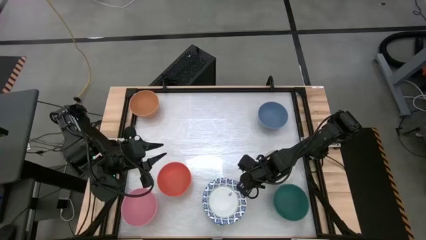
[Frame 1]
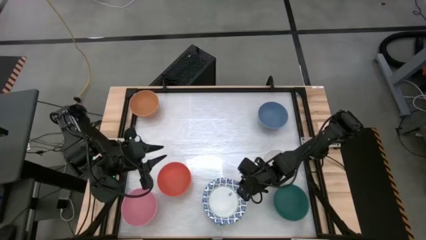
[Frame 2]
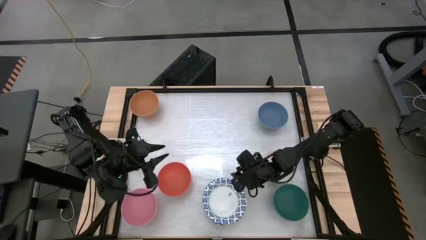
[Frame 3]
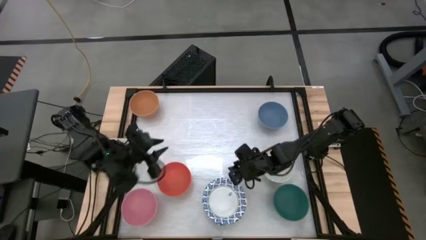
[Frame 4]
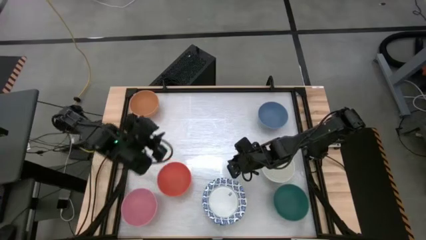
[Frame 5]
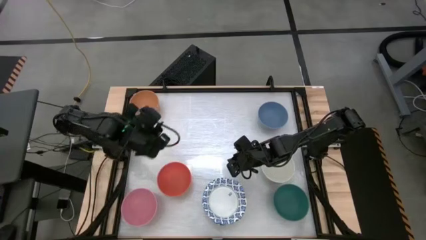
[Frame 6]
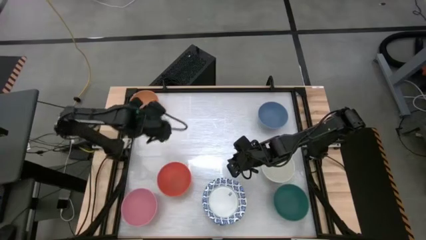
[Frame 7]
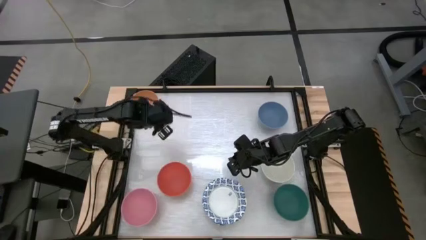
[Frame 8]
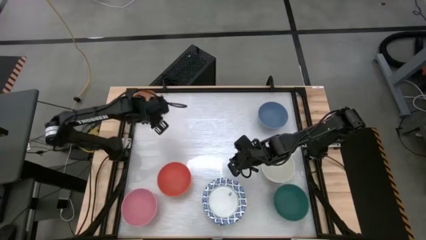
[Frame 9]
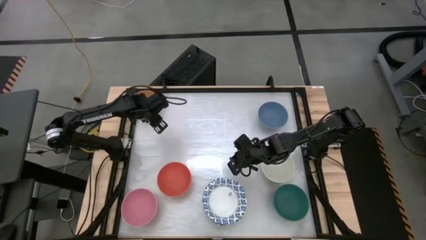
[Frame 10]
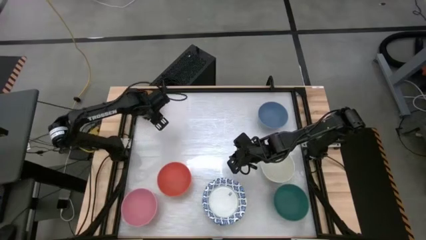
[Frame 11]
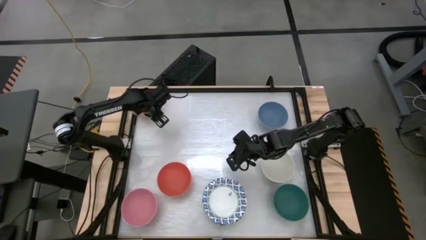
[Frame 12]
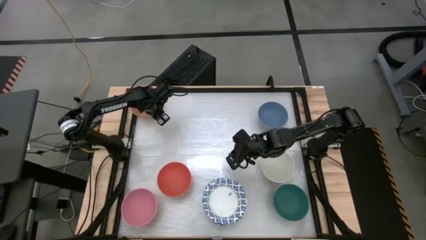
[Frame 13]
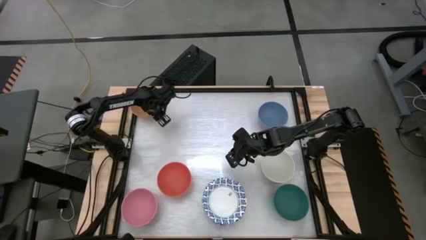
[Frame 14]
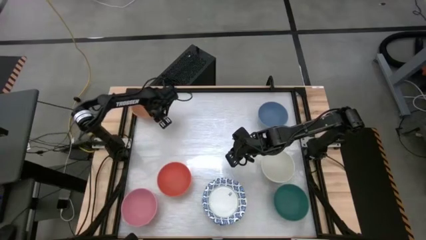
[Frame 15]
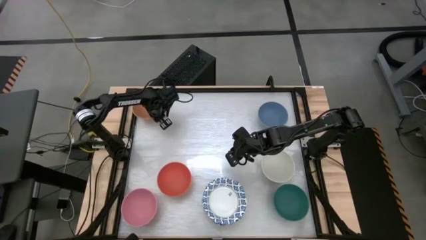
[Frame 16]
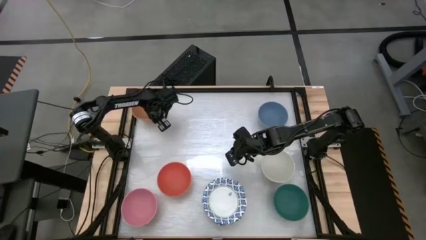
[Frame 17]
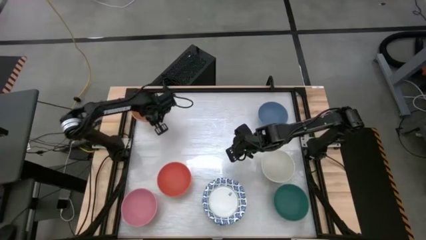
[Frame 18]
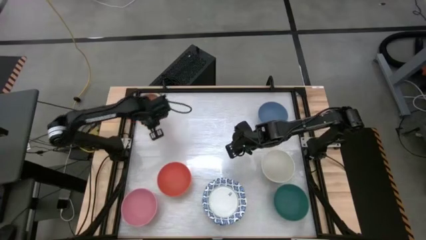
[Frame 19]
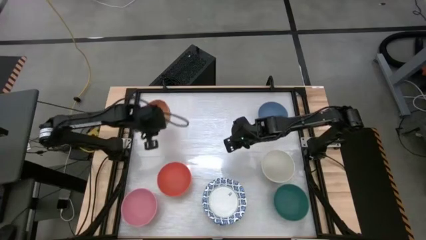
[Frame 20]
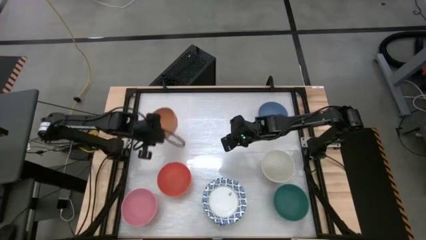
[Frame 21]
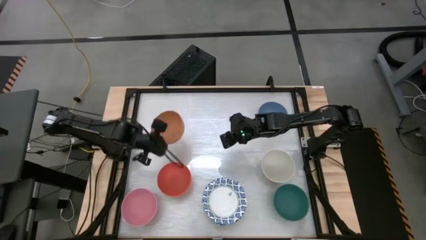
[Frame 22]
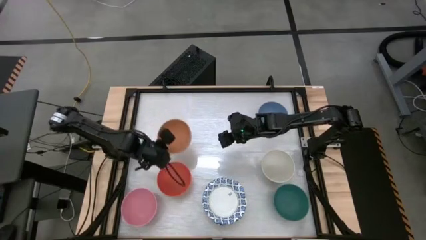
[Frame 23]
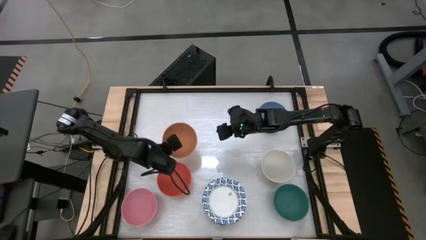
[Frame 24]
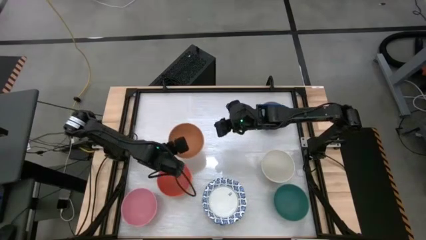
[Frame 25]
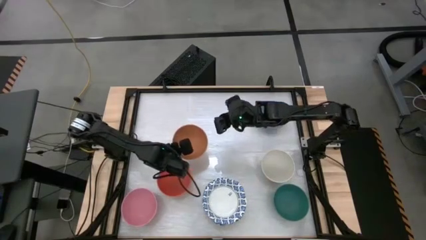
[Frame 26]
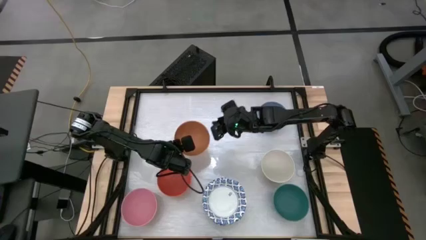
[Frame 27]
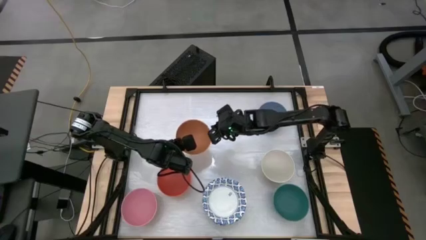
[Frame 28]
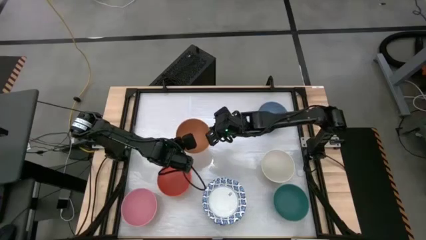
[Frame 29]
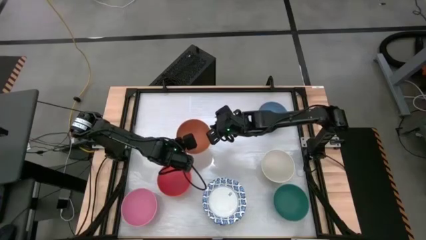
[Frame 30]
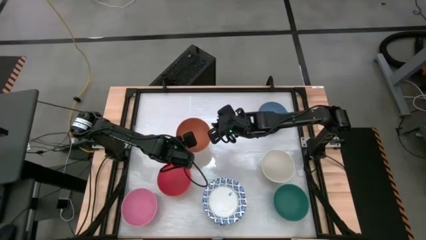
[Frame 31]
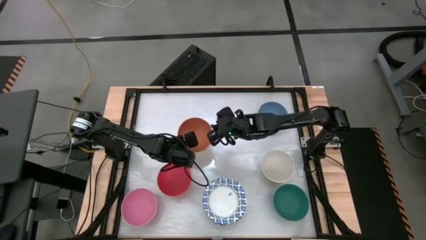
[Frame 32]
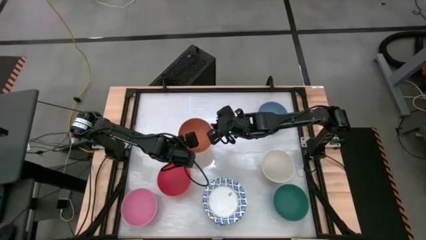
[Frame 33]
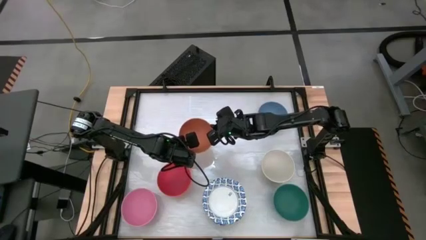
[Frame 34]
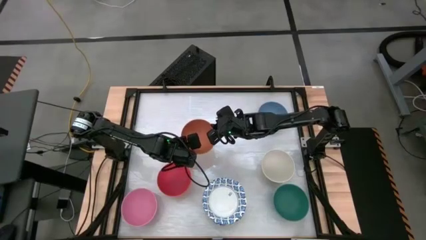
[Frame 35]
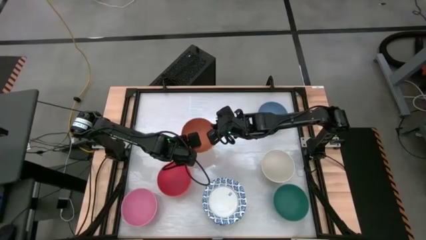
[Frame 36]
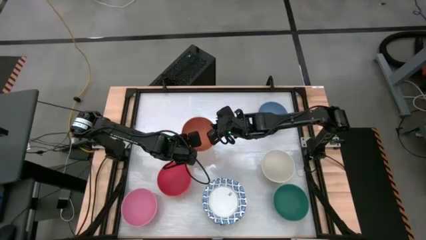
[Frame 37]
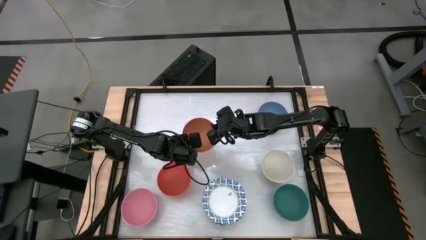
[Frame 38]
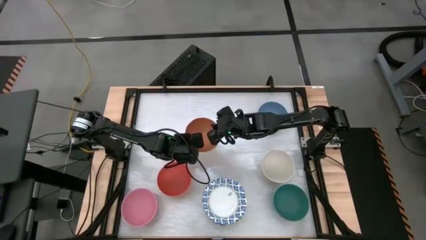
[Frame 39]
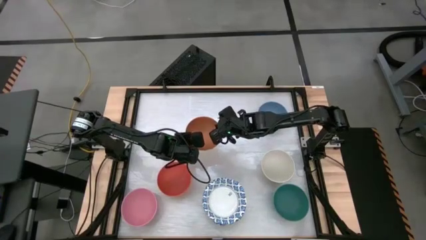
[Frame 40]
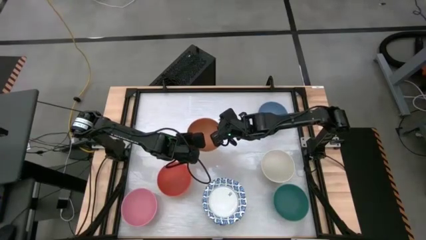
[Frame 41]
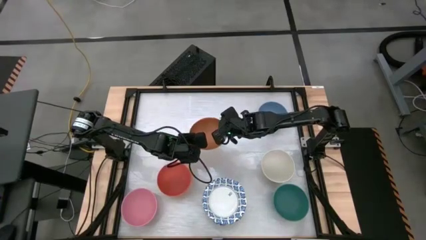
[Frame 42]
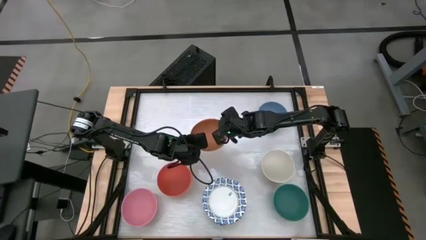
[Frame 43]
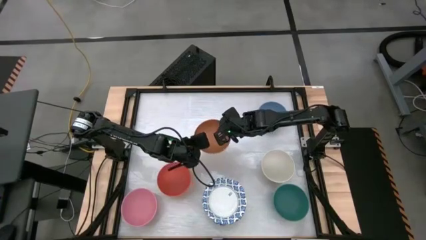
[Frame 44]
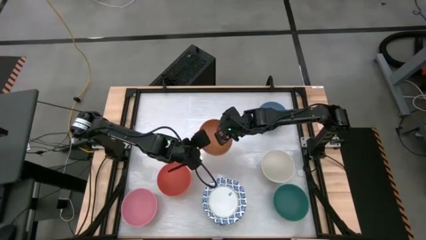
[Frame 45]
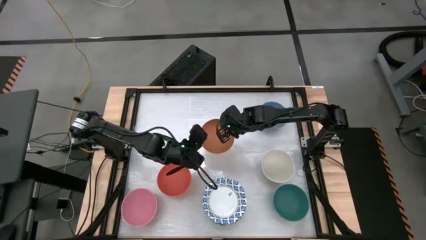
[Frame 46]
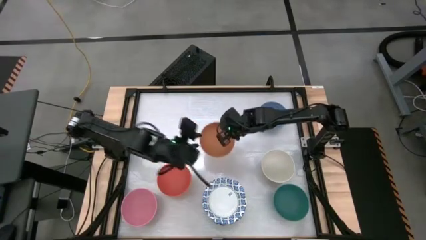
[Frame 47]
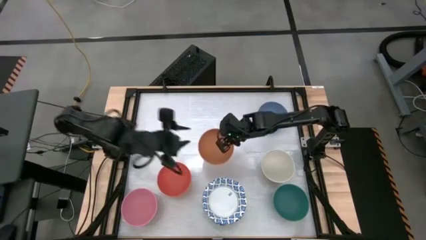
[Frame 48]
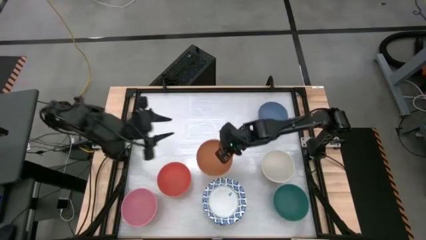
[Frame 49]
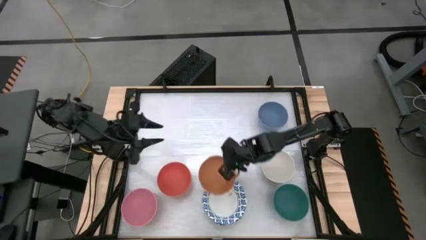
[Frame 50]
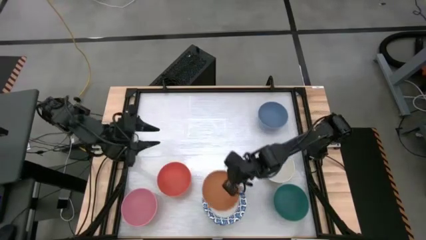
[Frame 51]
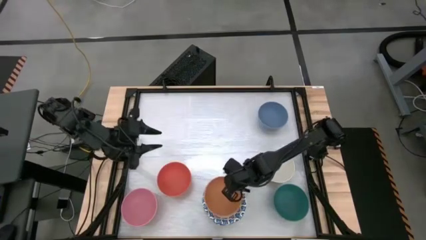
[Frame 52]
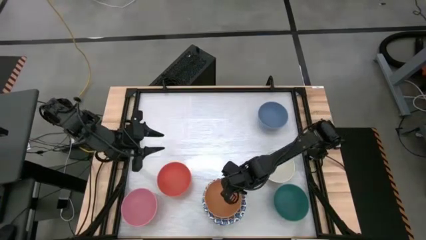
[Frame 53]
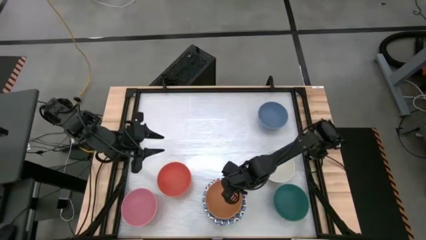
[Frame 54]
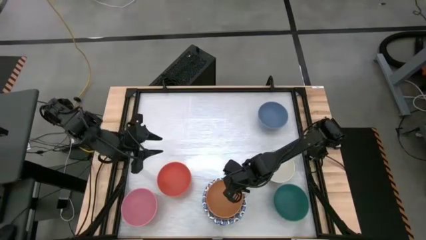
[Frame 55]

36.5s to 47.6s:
Task: Nest bowls inside each other by size order
Stack the brown bowl on top of the white patterned bowl

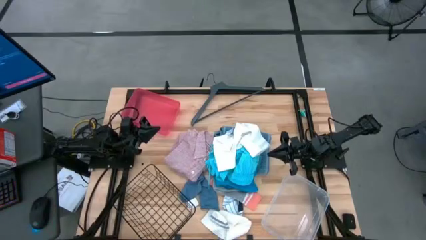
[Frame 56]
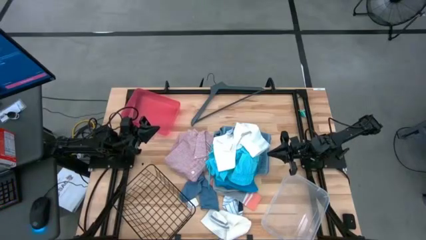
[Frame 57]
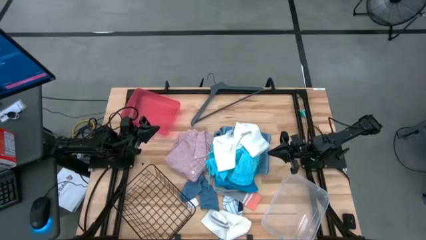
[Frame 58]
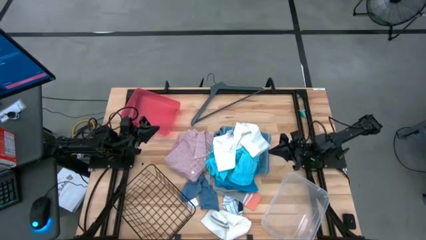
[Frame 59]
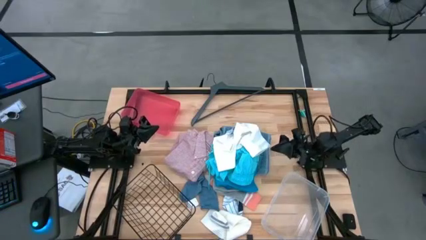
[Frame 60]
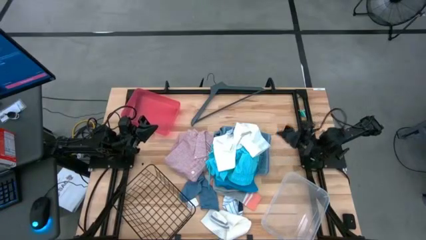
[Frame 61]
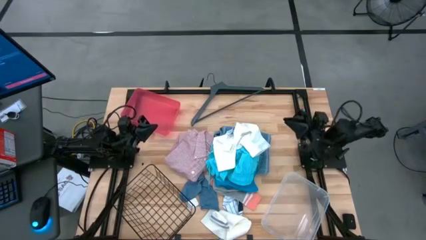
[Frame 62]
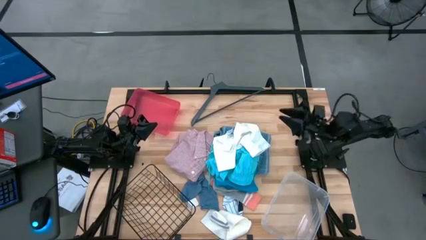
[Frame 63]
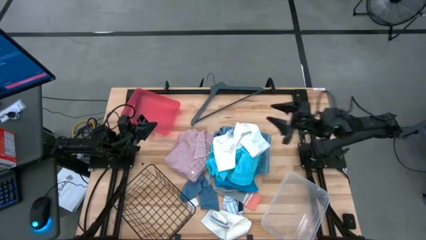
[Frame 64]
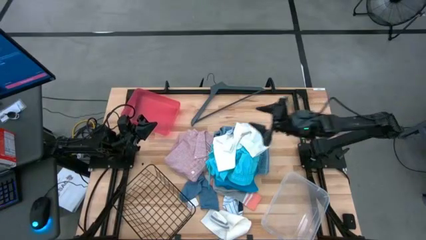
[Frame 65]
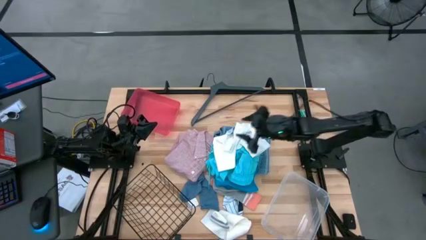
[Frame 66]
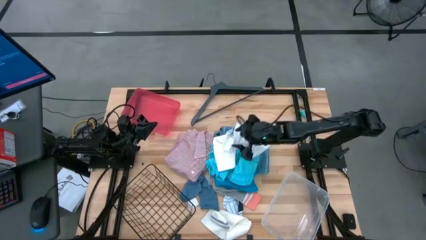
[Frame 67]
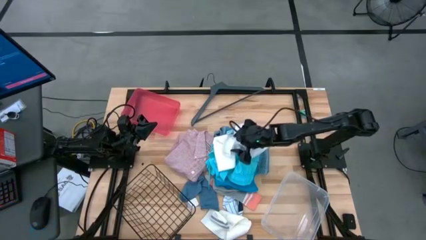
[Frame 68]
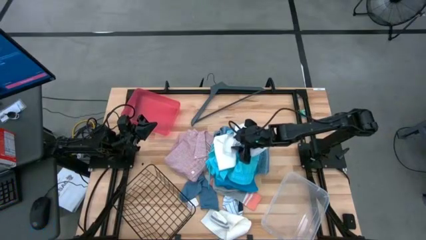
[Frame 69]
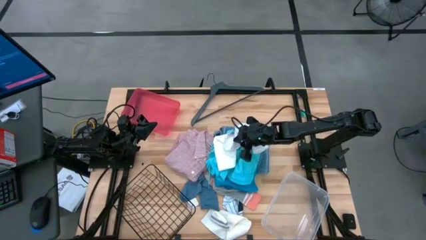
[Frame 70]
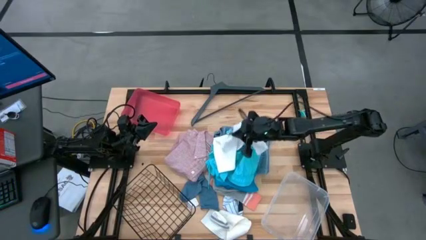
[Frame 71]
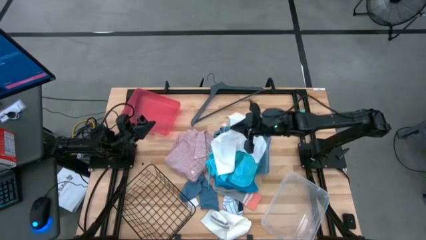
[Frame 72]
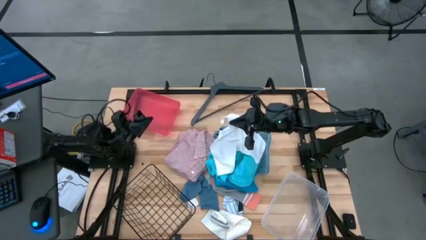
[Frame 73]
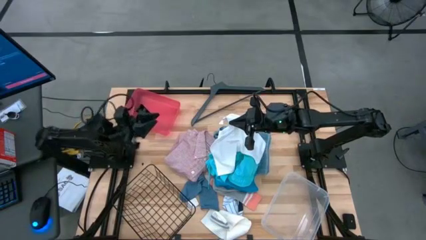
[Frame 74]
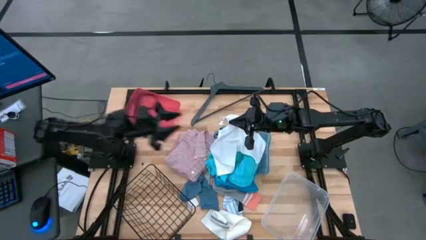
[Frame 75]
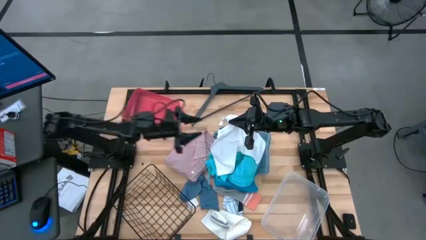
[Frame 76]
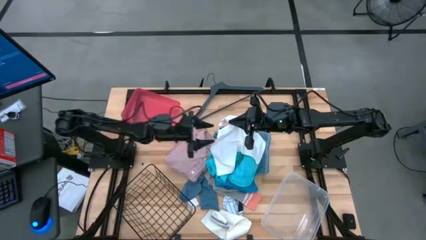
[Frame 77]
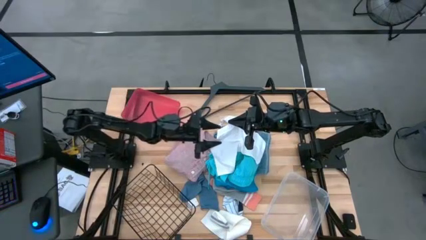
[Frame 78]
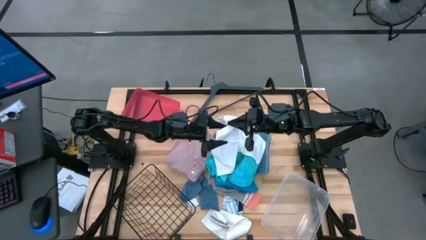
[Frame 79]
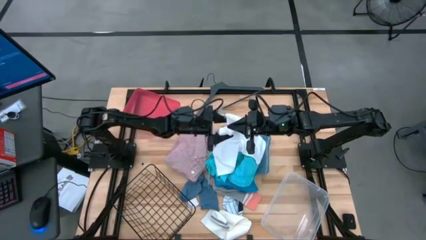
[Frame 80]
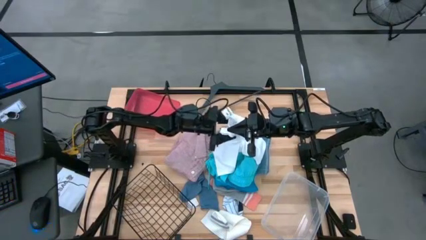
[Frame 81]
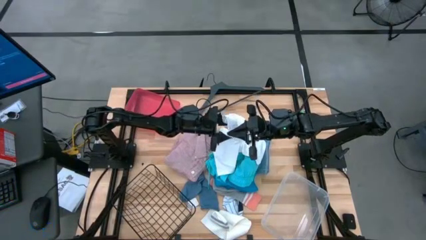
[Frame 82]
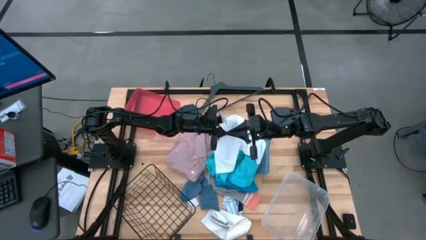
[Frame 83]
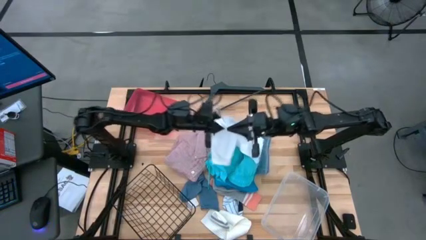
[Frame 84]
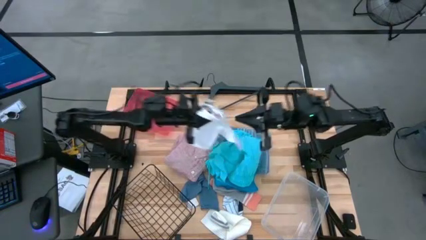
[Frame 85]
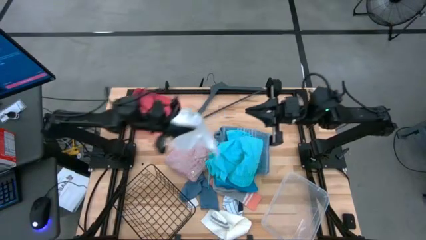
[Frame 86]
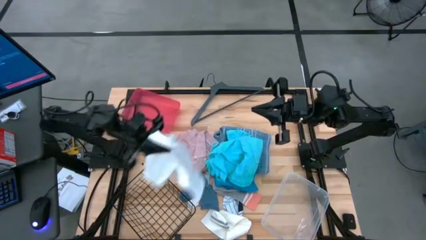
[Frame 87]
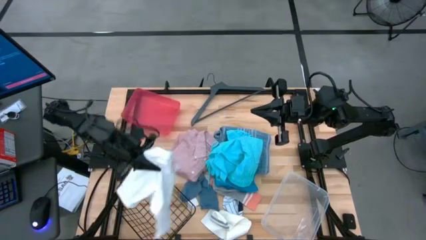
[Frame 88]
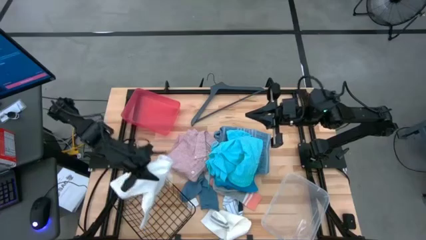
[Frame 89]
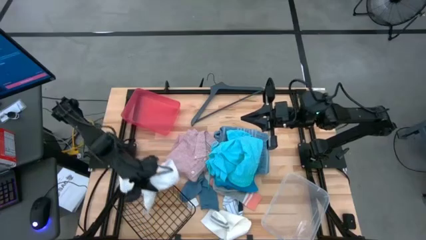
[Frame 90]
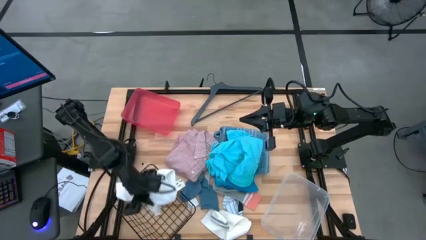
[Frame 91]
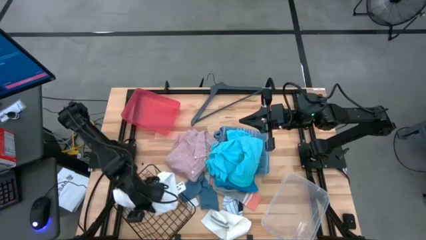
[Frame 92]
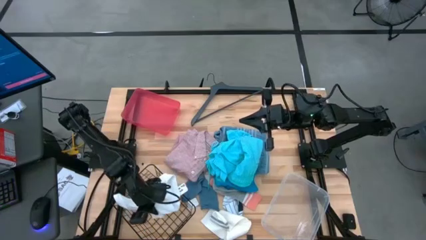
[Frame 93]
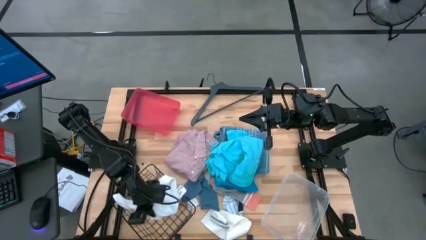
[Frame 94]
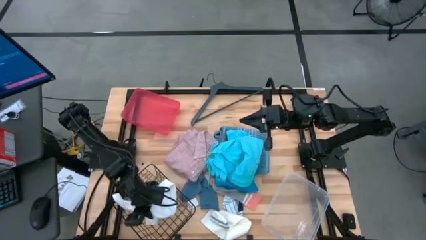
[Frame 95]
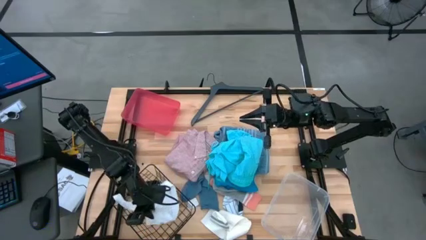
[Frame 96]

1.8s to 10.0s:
Task: Pick & Place Cloths
Put the white shorts into the black wire basket
